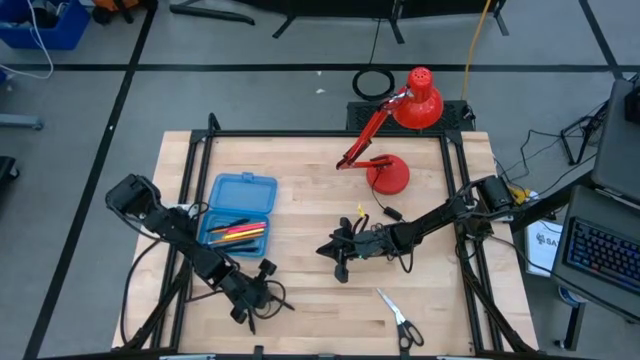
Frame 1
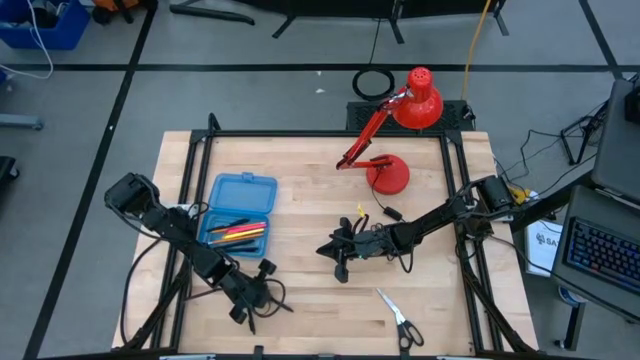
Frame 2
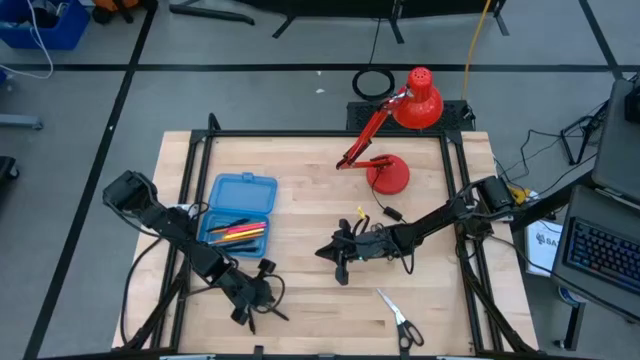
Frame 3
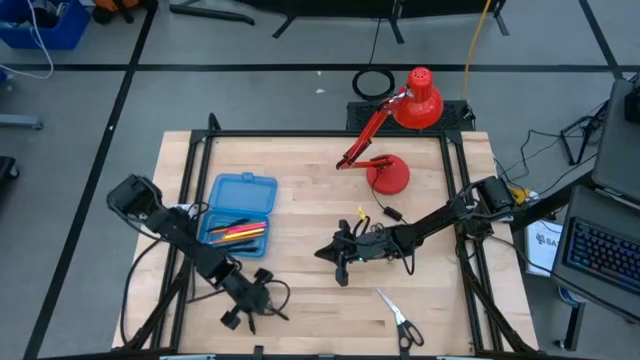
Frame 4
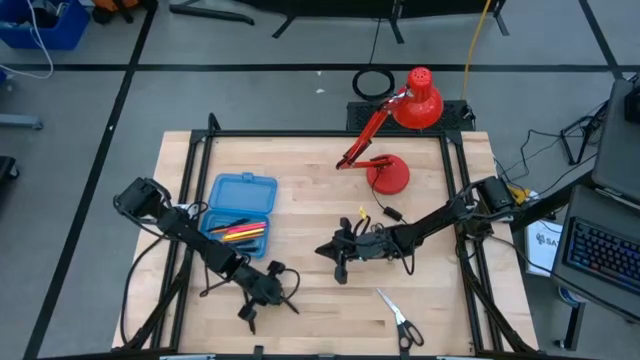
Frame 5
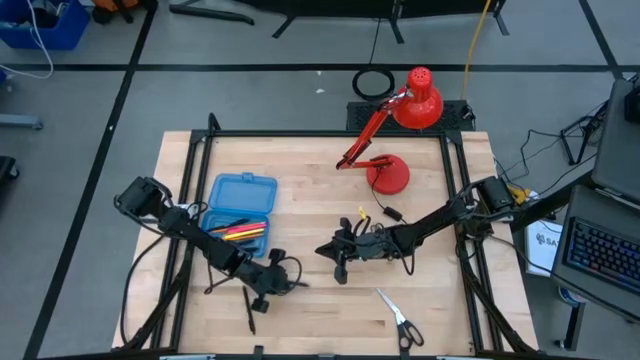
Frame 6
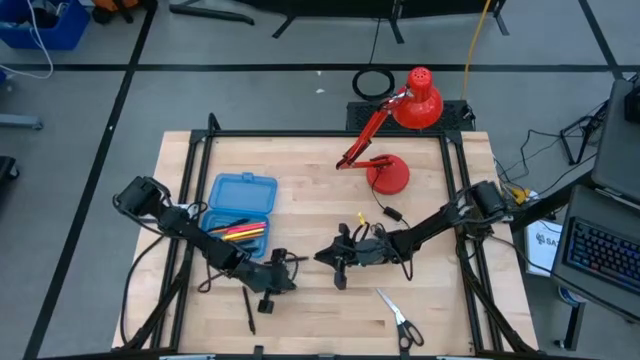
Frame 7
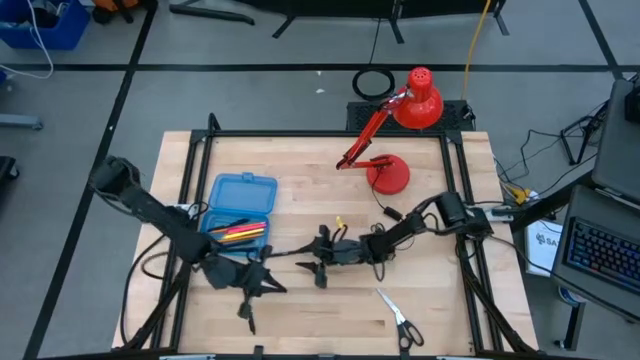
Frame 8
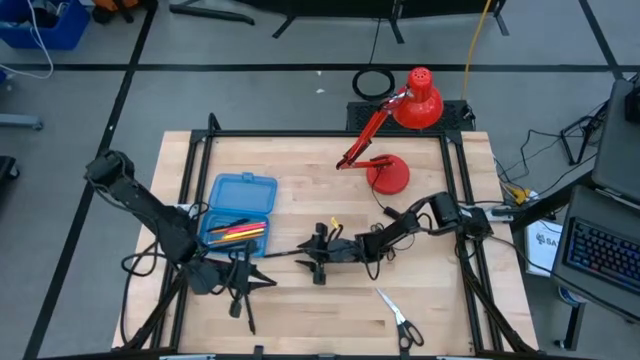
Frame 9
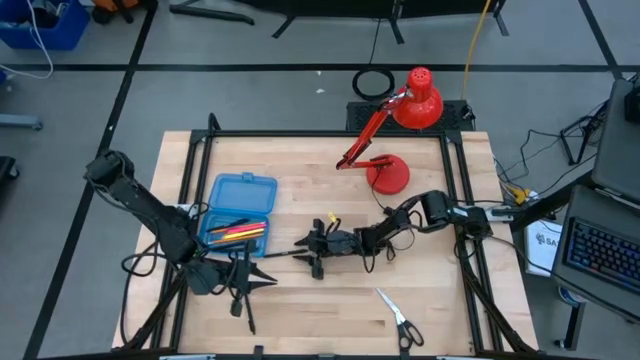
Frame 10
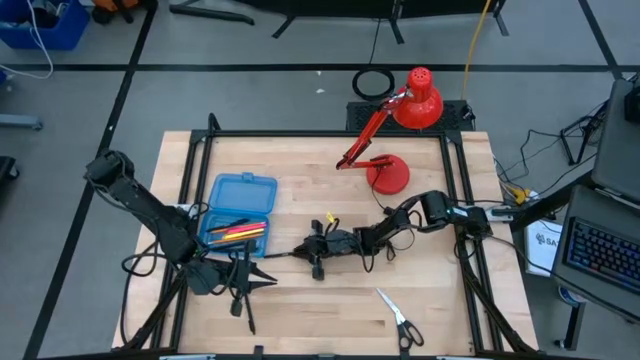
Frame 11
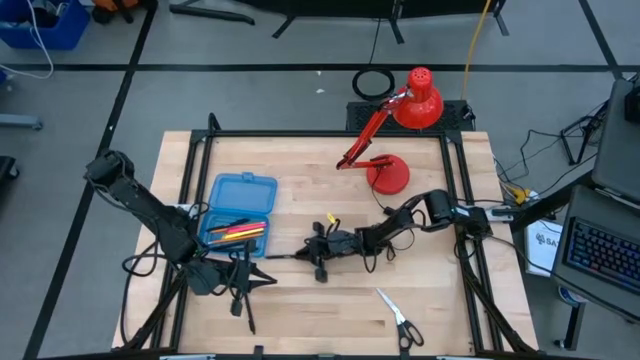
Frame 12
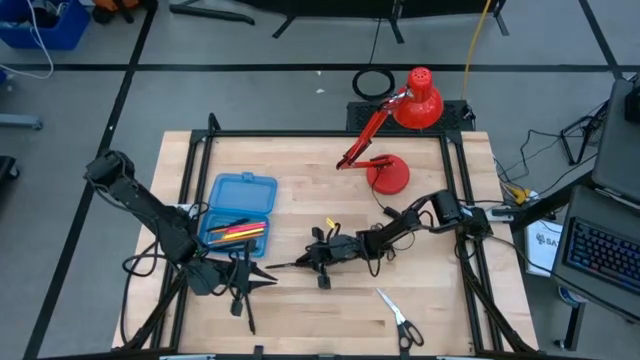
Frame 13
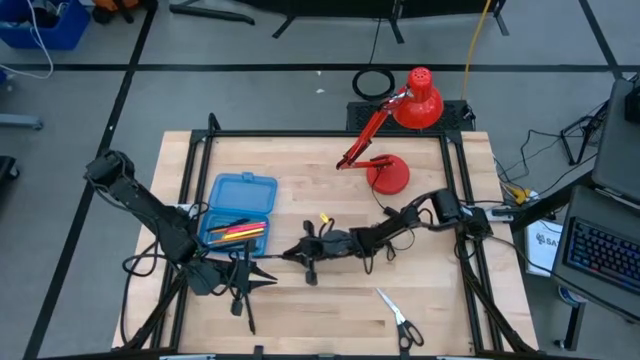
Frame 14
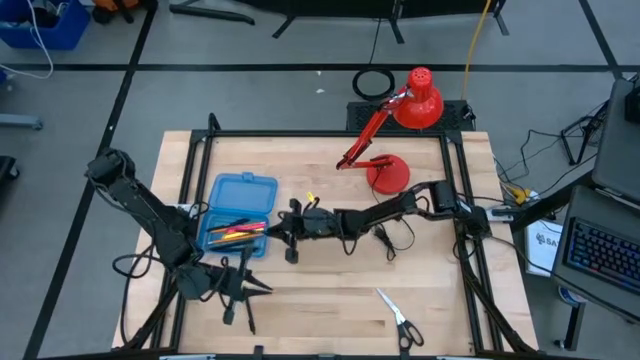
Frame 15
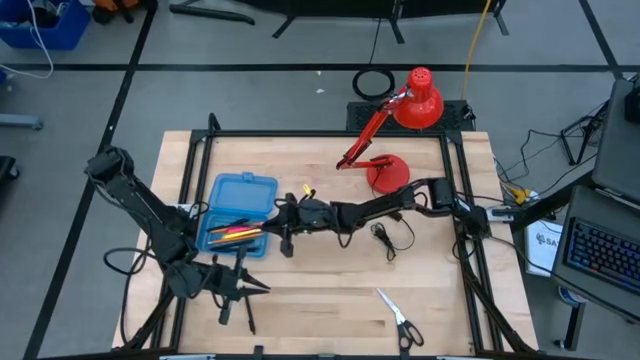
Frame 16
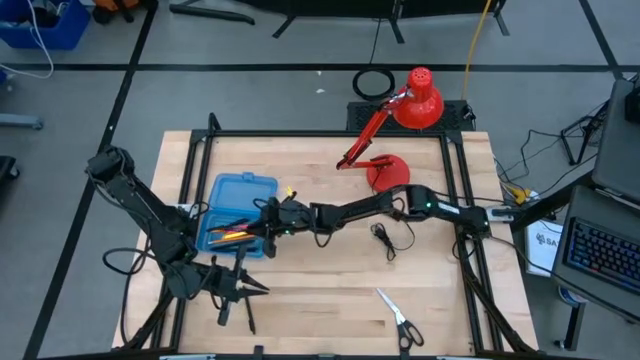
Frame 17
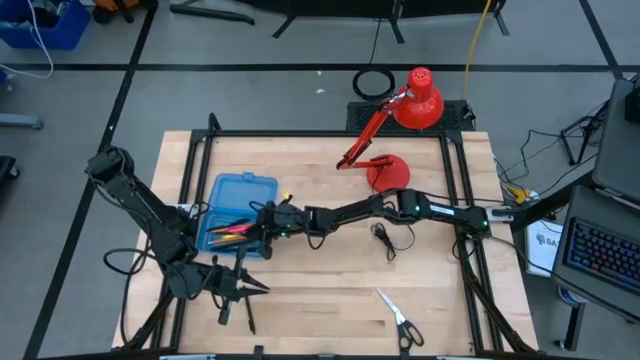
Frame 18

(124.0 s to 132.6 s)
Task: Pick & place school supplies into a supply box
Put the black pen into the blue supply box

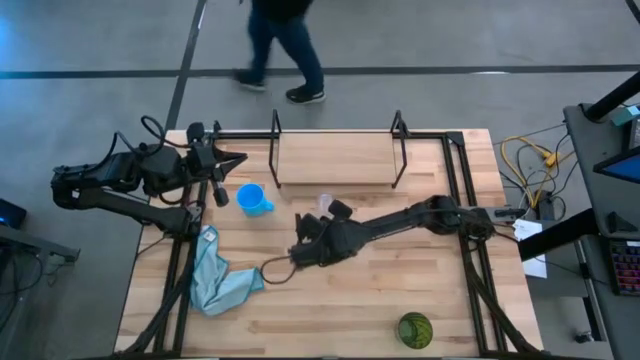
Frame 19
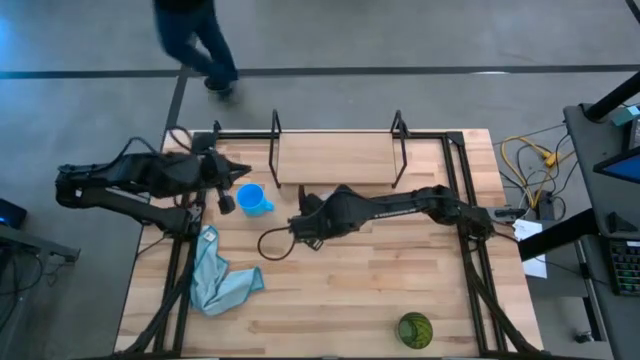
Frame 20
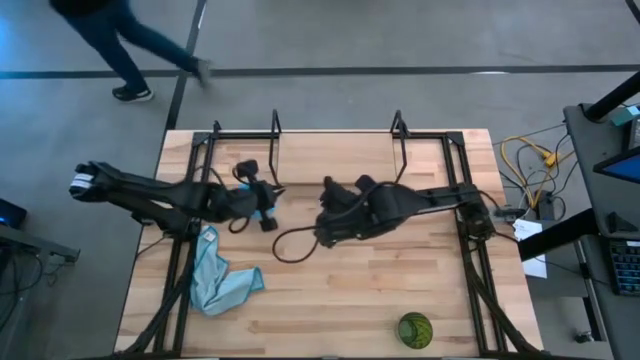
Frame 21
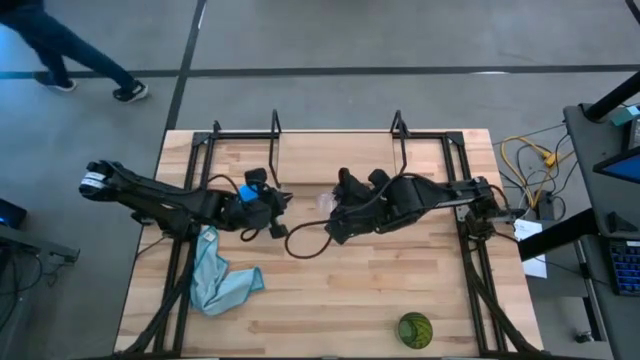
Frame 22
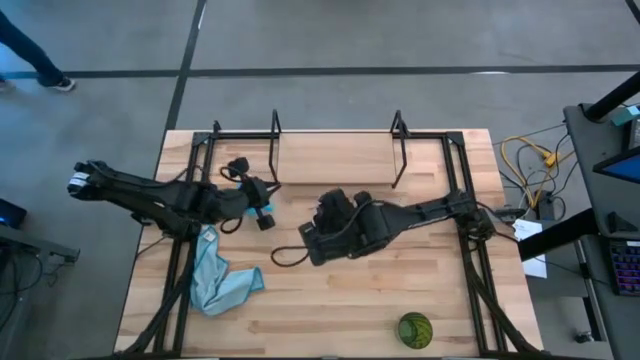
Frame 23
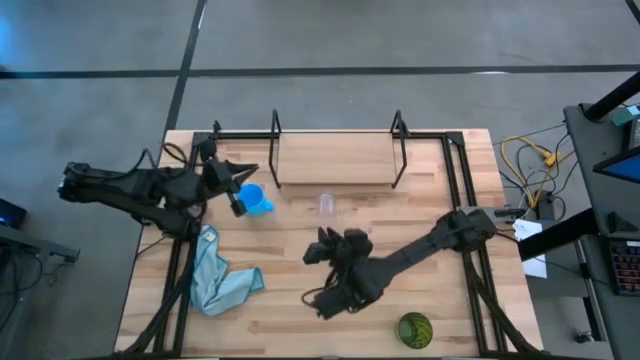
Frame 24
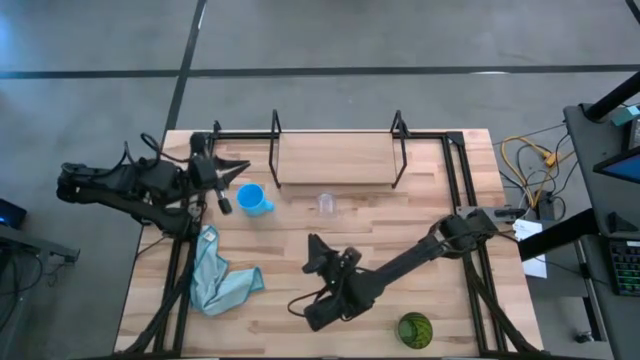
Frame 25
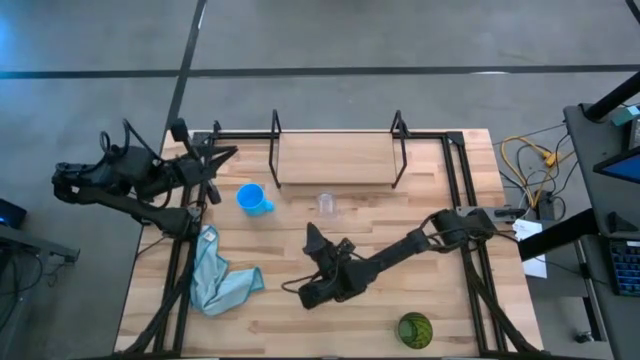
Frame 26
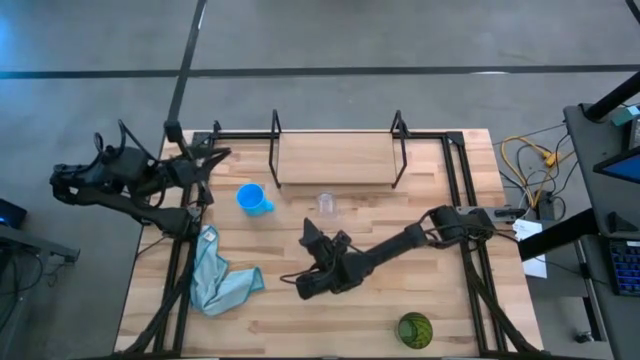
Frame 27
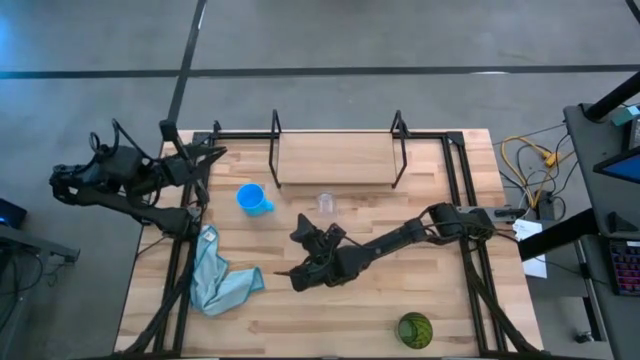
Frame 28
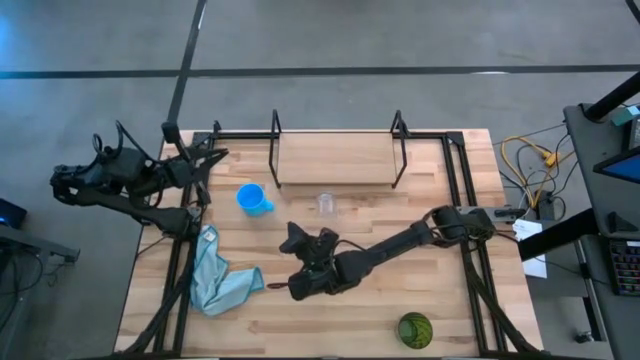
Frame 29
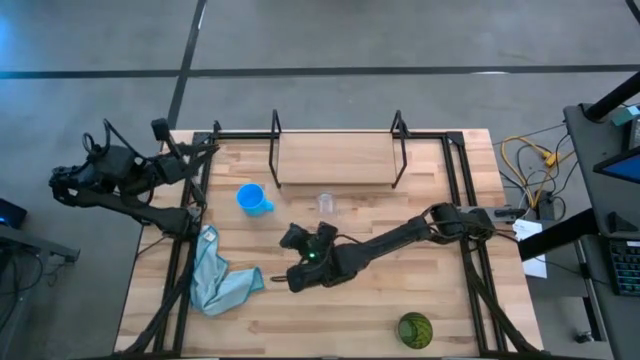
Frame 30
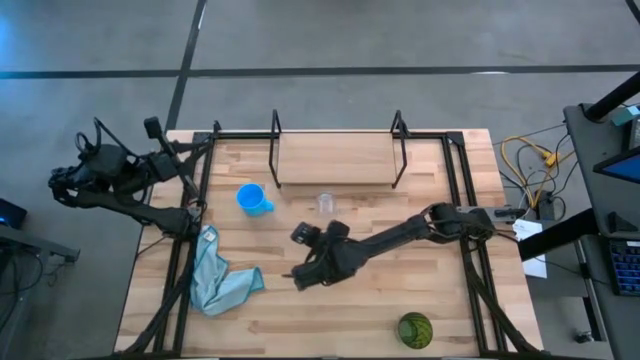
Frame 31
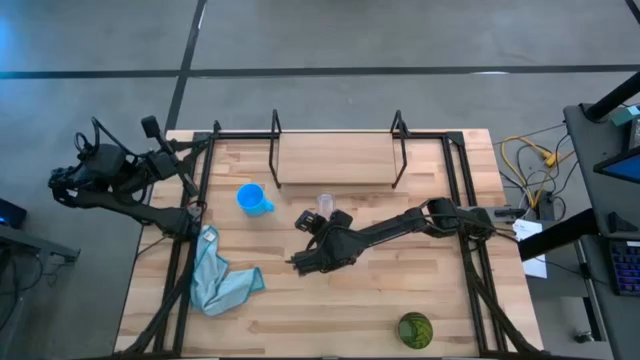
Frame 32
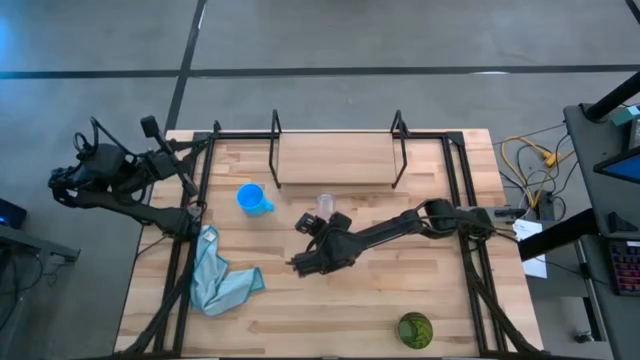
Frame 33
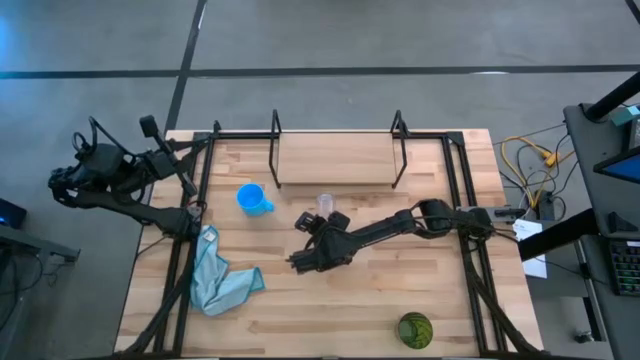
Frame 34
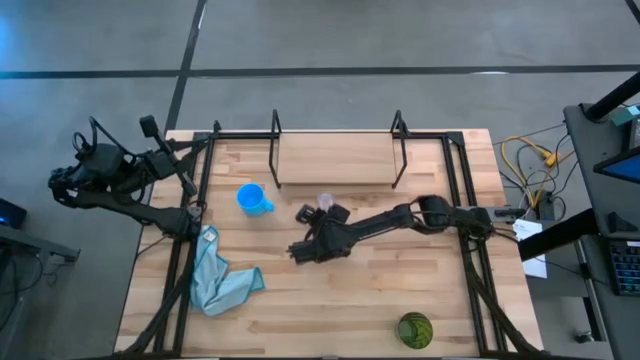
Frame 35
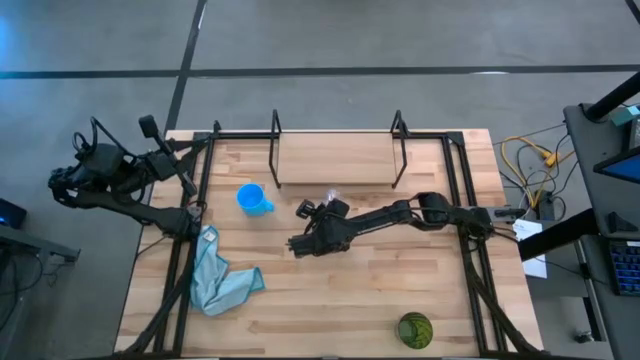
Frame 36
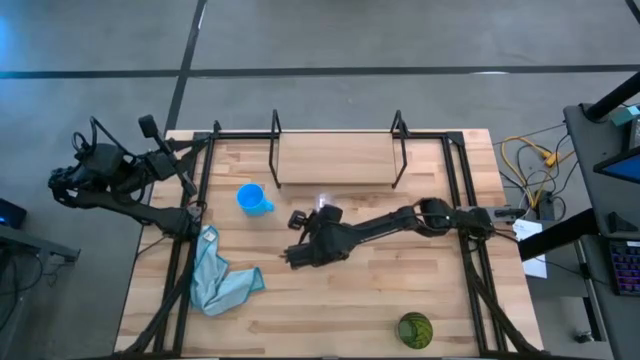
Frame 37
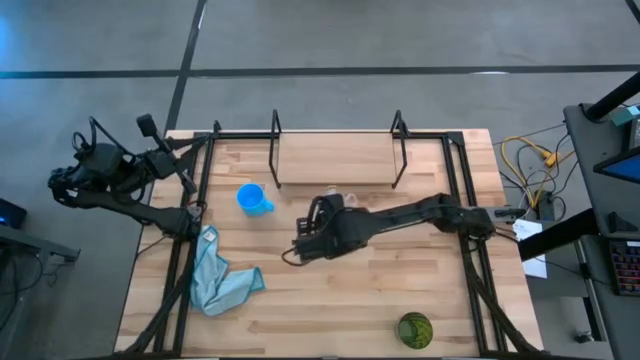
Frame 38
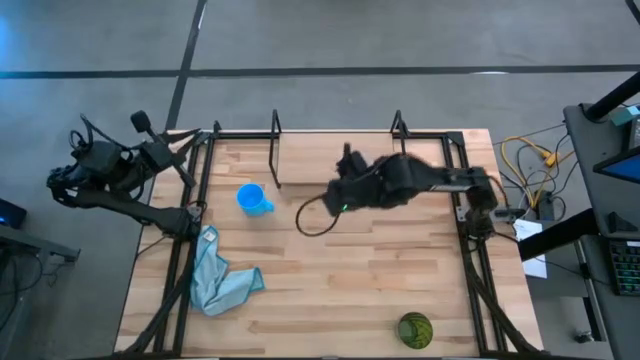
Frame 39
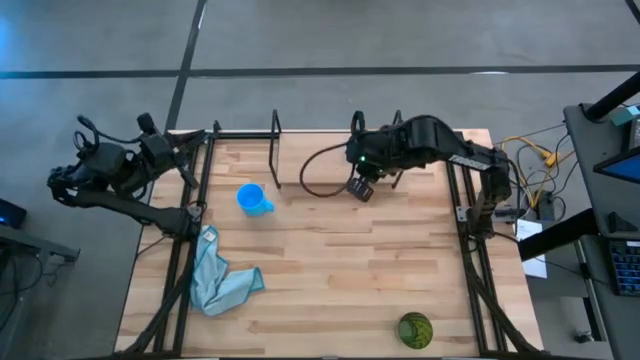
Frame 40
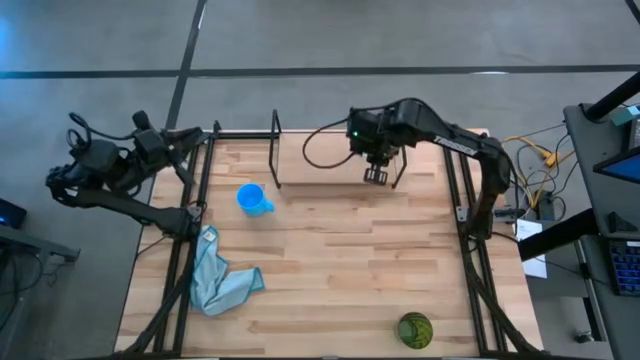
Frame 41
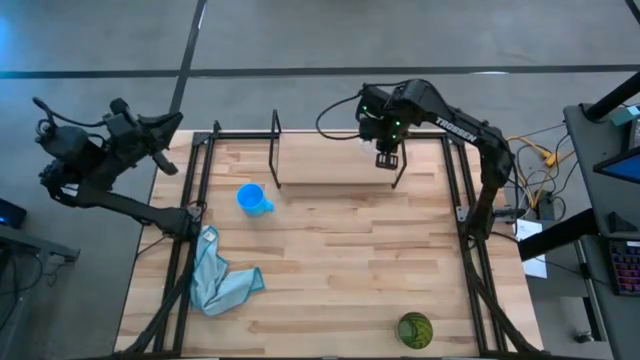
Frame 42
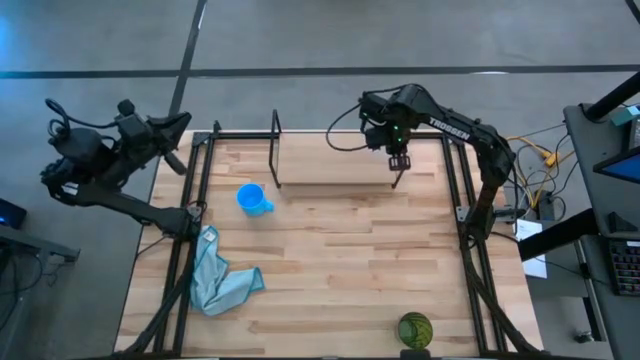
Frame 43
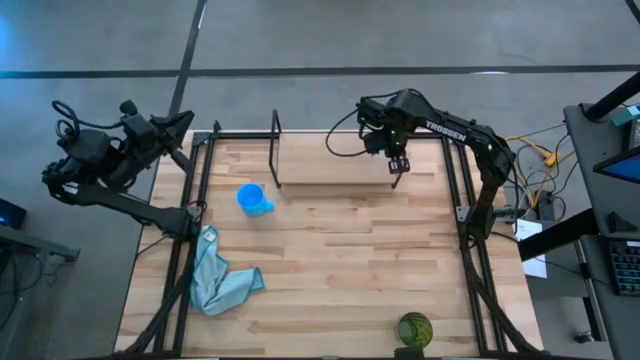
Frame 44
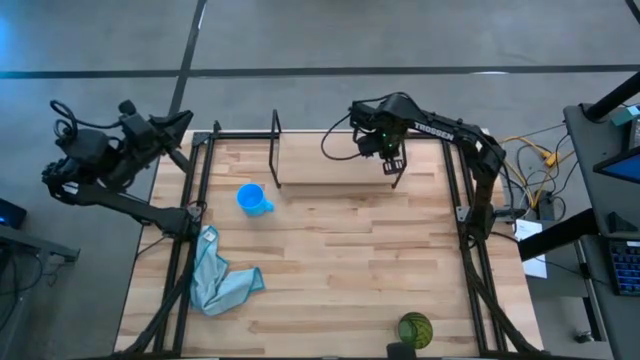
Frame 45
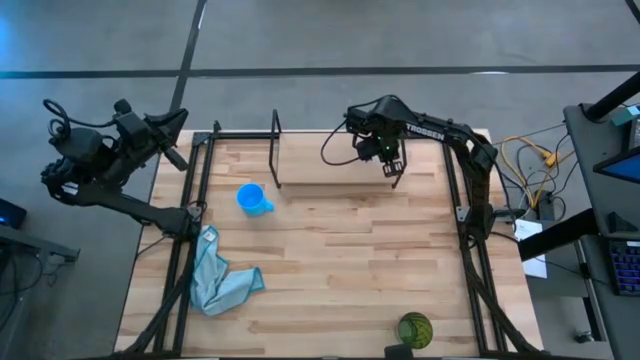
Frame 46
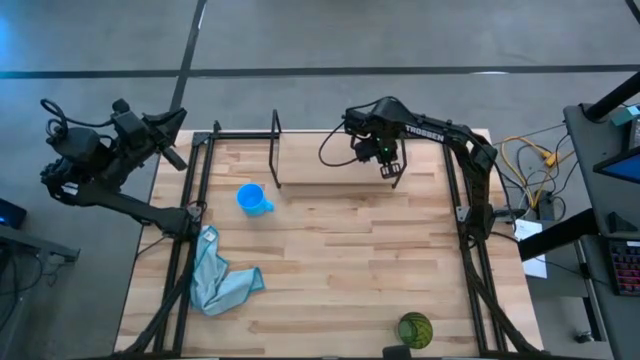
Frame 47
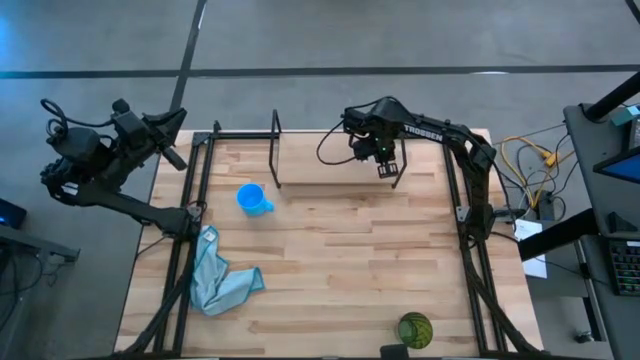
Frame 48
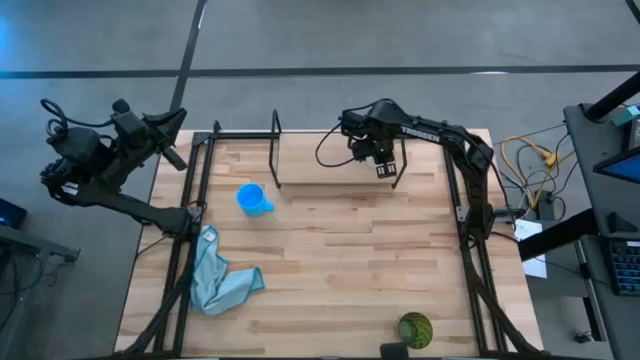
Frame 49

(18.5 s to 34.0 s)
Task: Stack small to large cups/mugs on shelf
Put the transparent mug on the shelf
